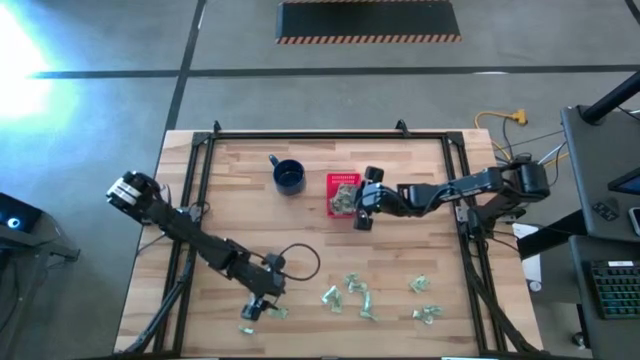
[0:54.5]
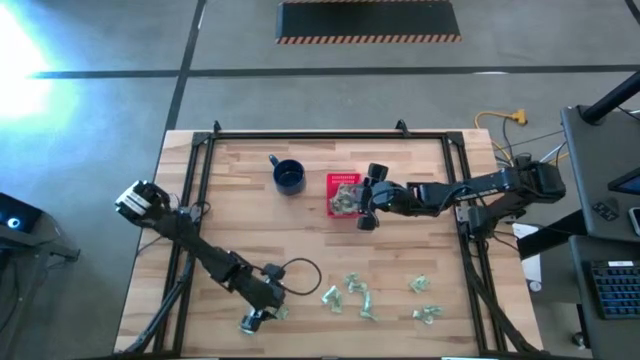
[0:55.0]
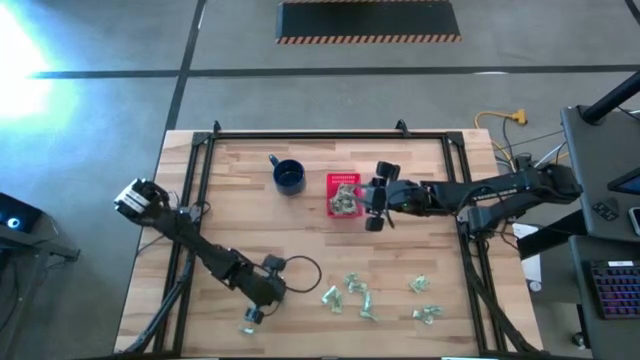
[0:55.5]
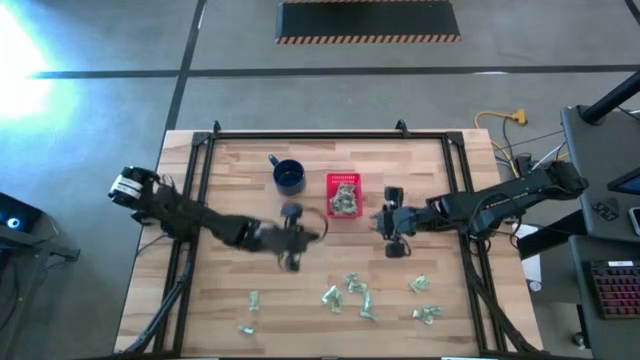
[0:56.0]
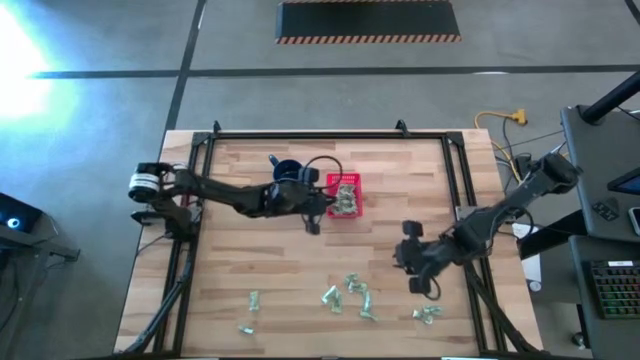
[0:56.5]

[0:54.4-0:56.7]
Task: Pick and place items into bin
Put the green stevia packet into the red bin

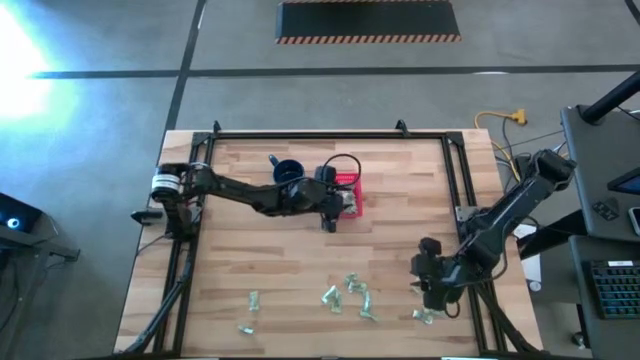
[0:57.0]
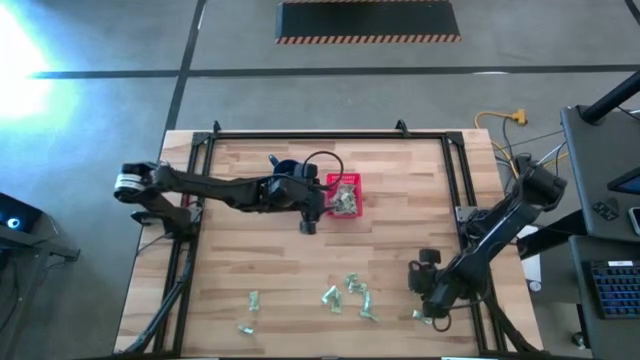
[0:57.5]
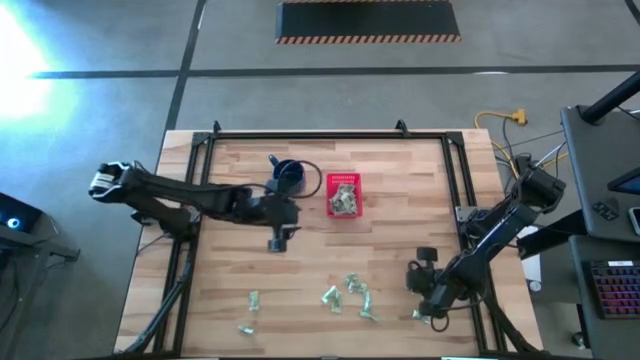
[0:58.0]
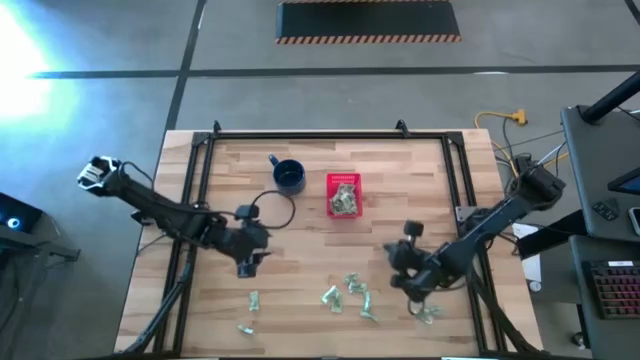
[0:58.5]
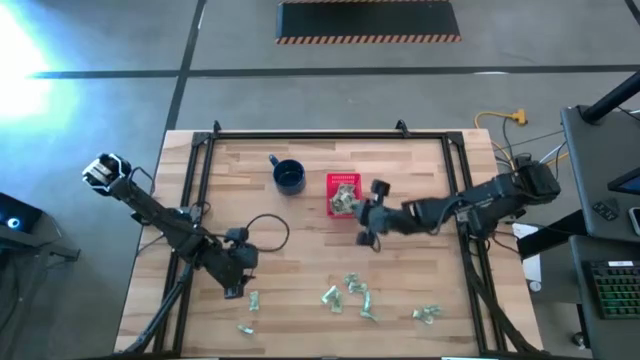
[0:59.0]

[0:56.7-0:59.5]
Put the green stevia packet into the red bin

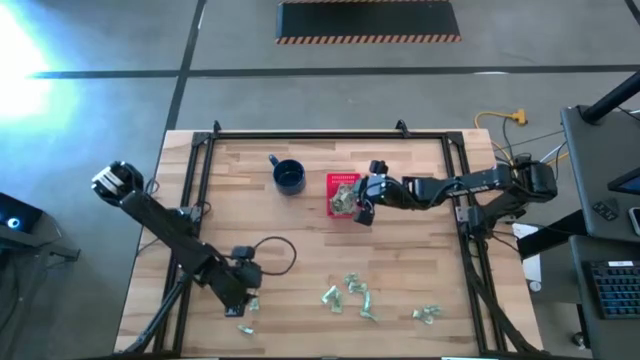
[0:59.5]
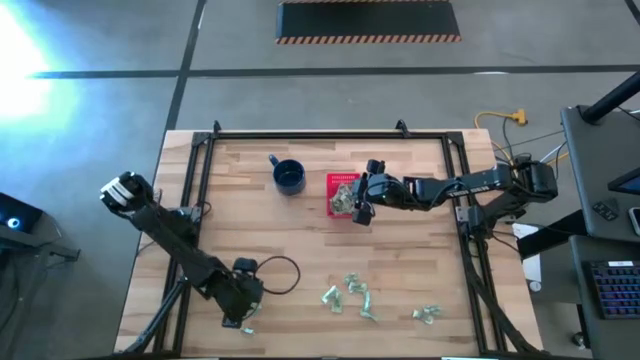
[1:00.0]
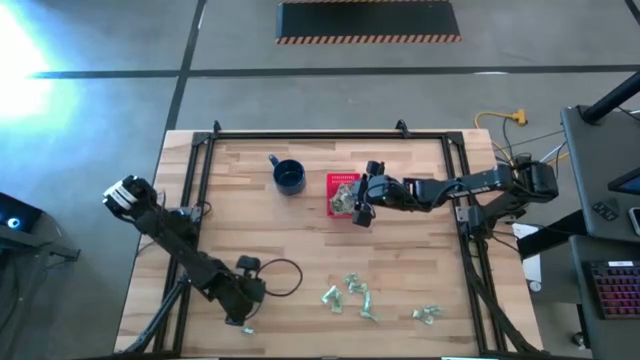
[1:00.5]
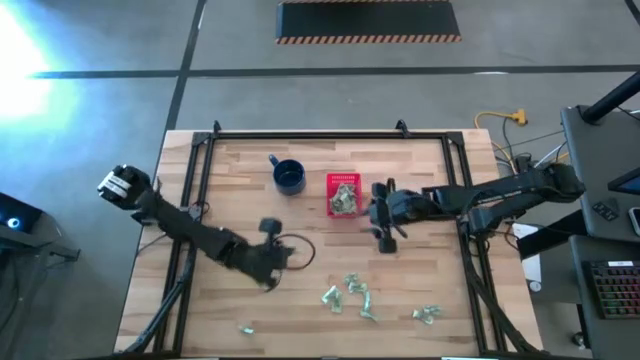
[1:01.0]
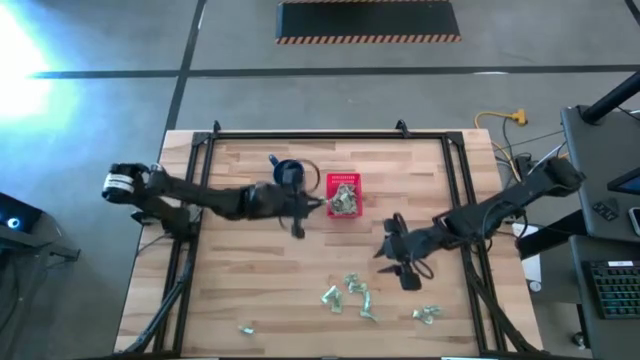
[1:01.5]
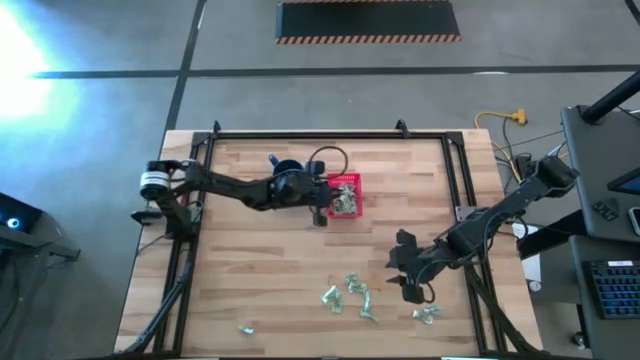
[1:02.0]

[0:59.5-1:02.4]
Put the green stevia packet into the red bin

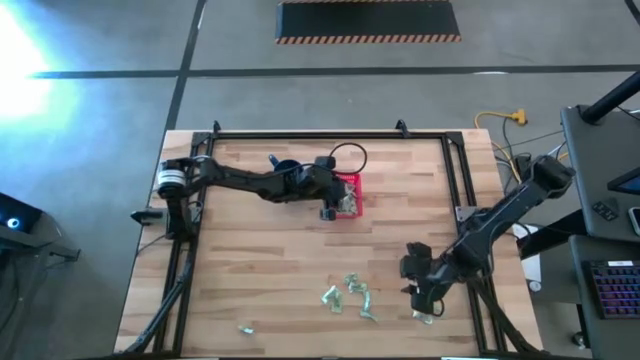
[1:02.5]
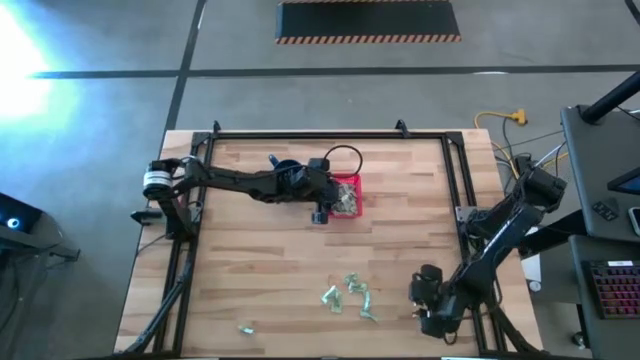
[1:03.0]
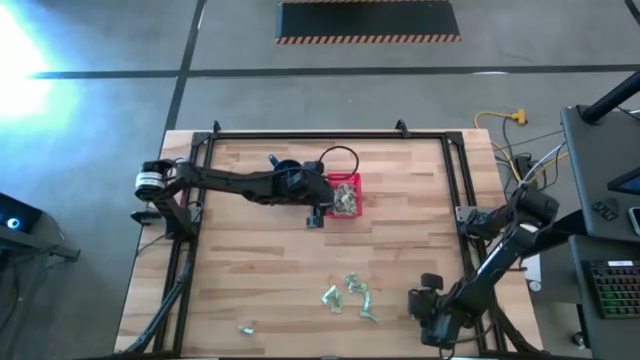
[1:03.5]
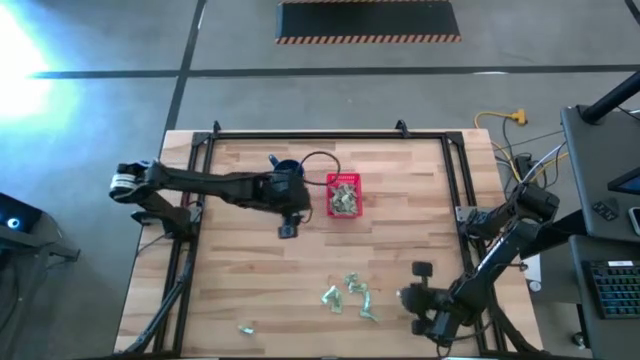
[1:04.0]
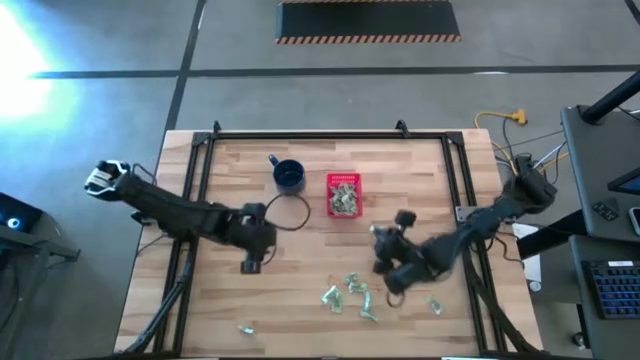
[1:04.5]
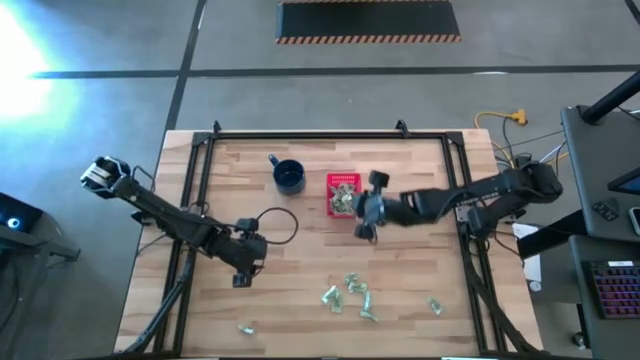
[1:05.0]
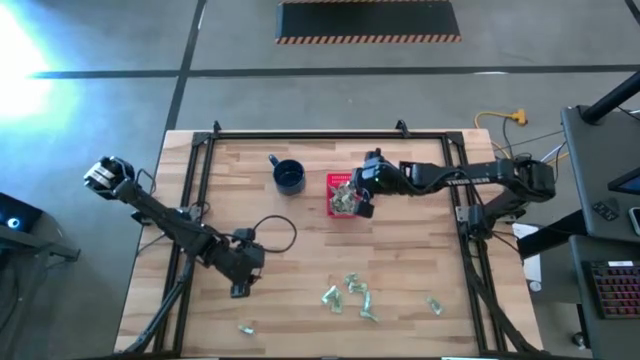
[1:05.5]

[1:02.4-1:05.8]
Put the green stevia packet into the red bin

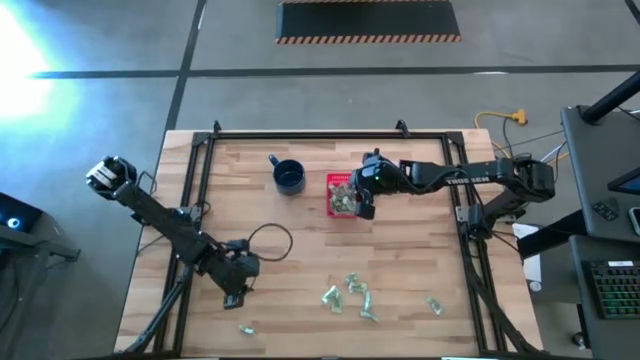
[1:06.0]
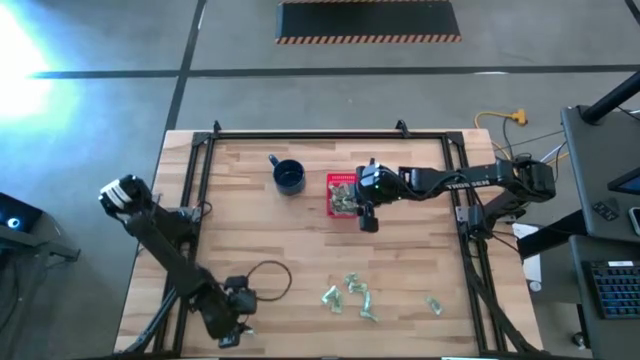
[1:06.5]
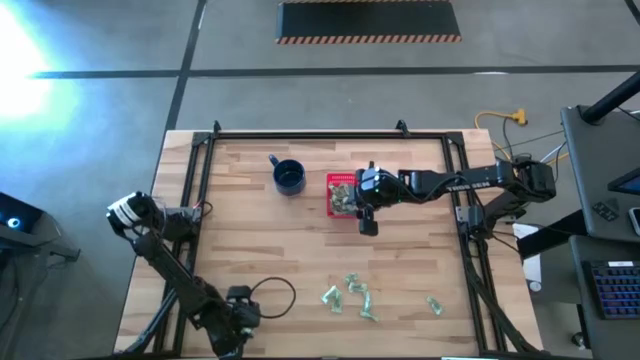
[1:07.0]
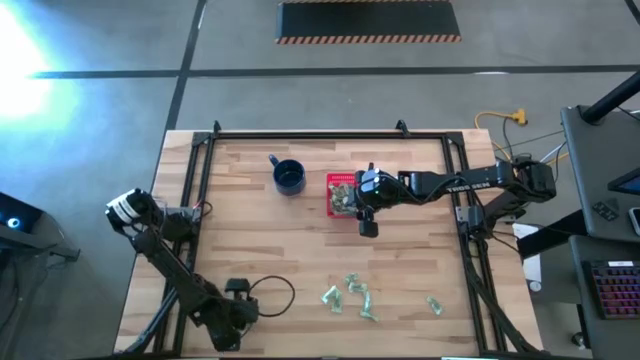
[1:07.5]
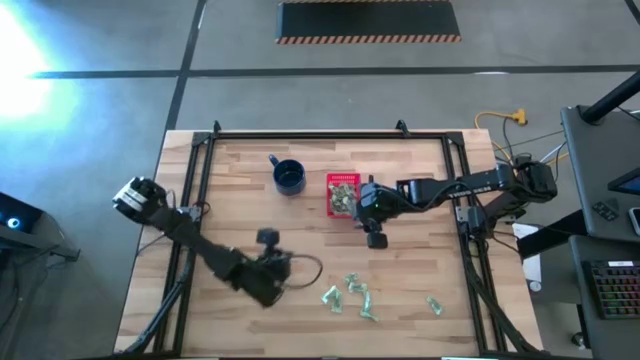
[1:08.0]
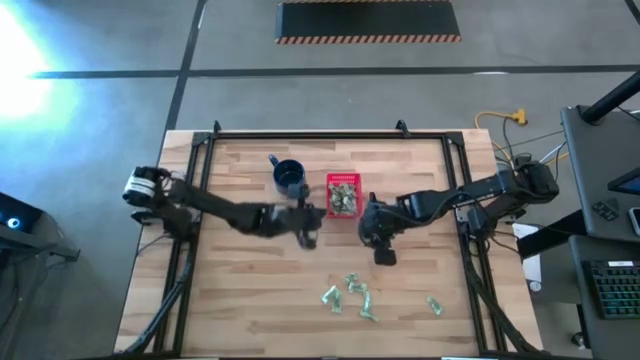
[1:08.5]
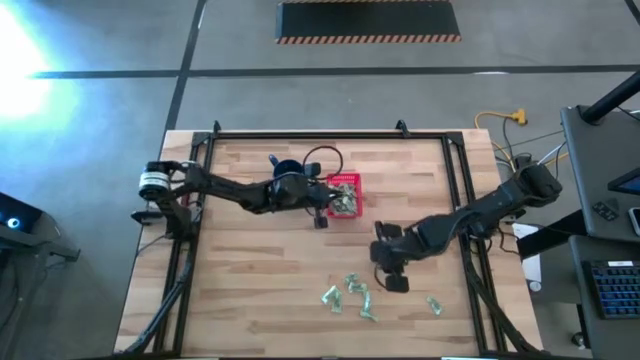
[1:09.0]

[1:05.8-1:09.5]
Put the green stevia packet into the red bin

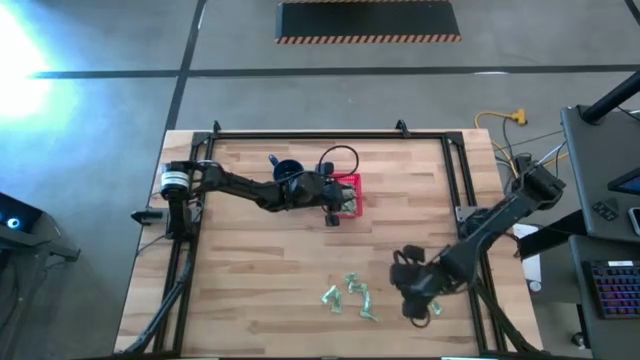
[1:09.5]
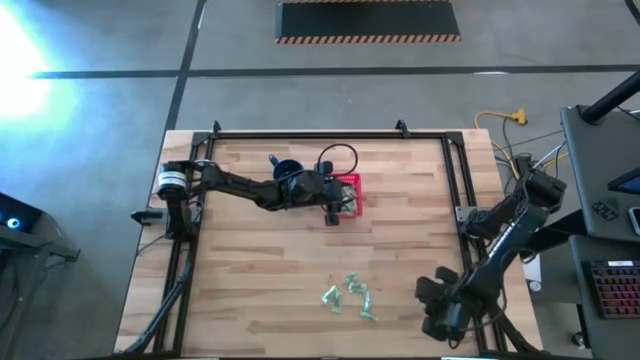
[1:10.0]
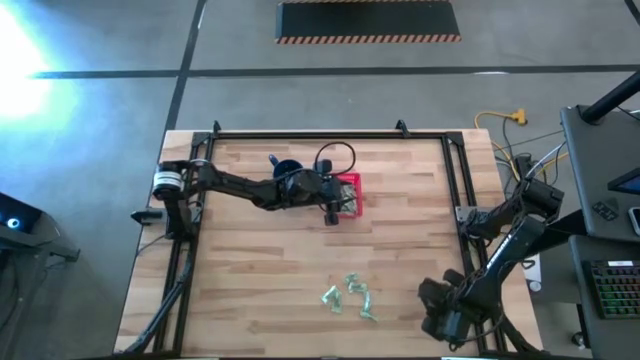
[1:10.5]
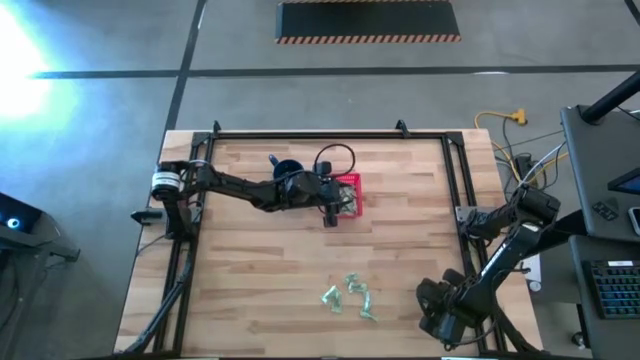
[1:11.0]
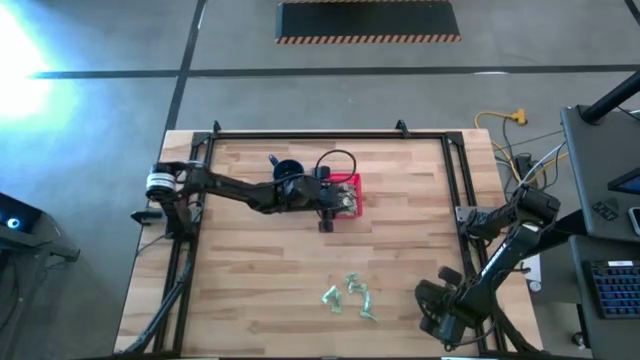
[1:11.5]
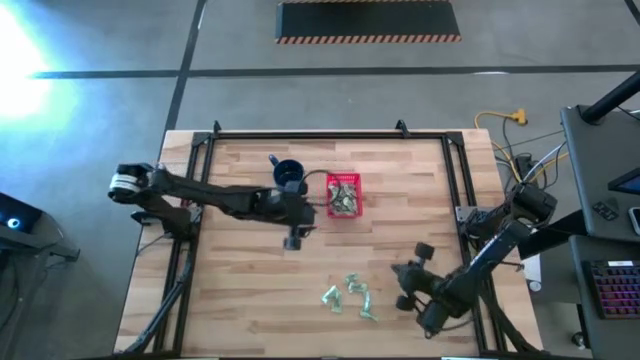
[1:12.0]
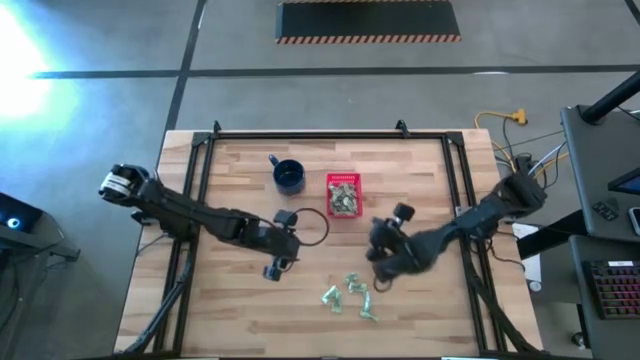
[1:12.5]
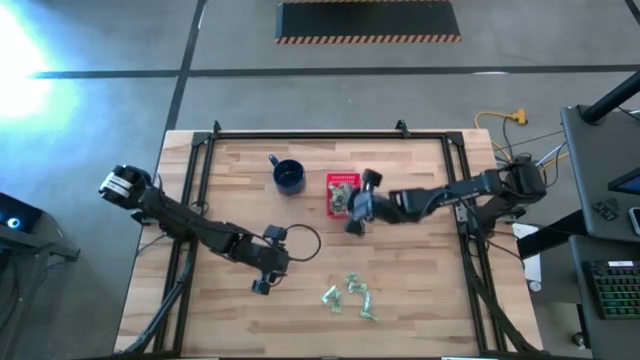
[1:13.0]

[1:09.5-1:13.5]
Put the green stevia packet into the red bin

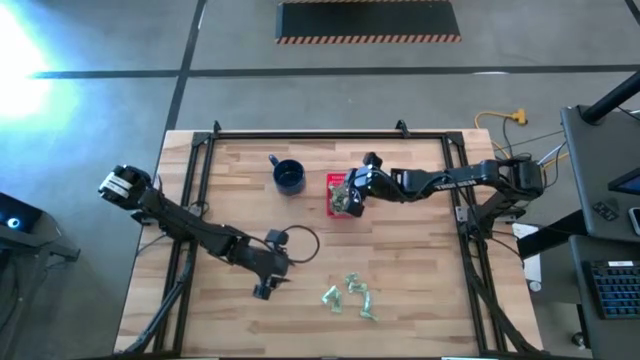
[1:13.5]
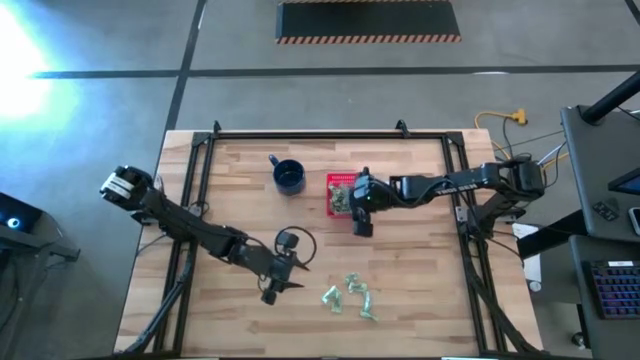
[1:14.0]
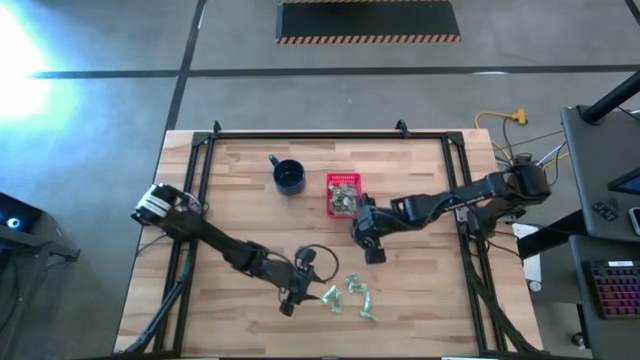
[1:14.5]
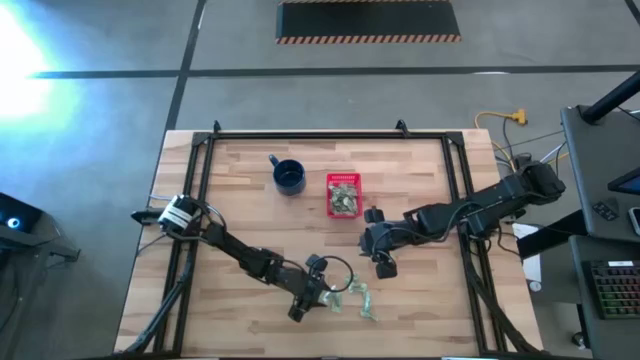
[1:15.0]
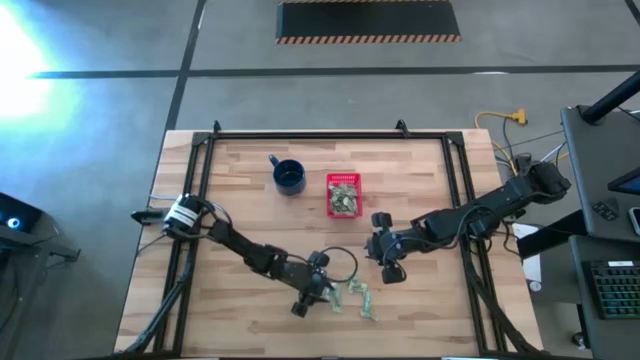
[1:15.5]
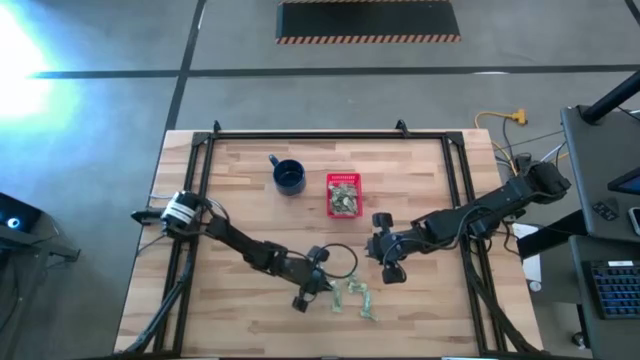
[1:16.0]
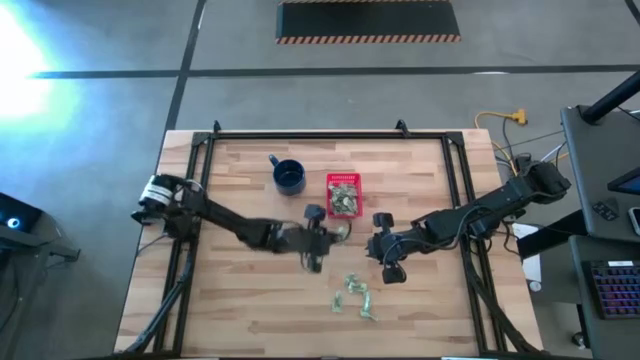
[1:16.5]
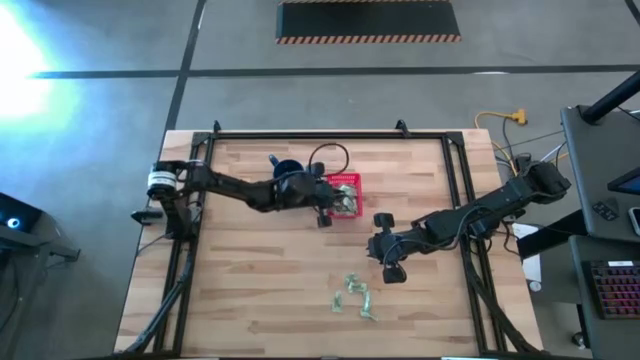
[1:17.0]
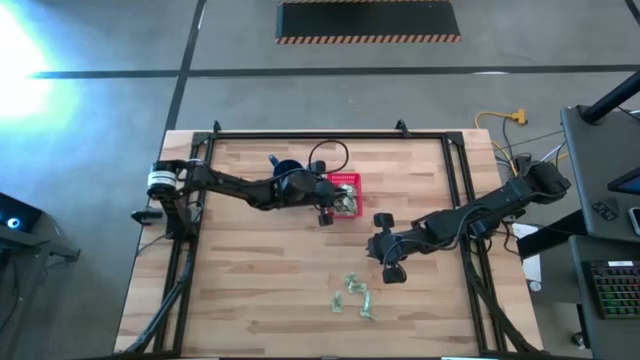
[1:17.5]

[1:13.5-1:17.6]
Put the green stevia packet into the red bin
